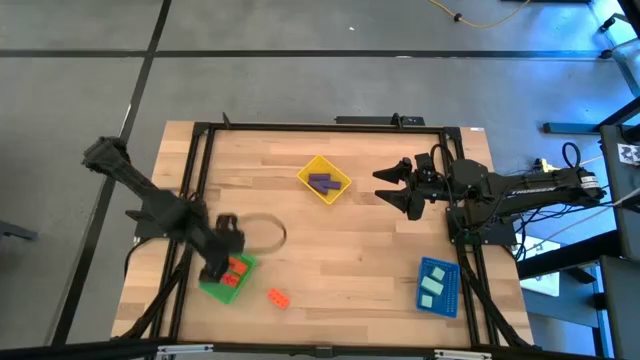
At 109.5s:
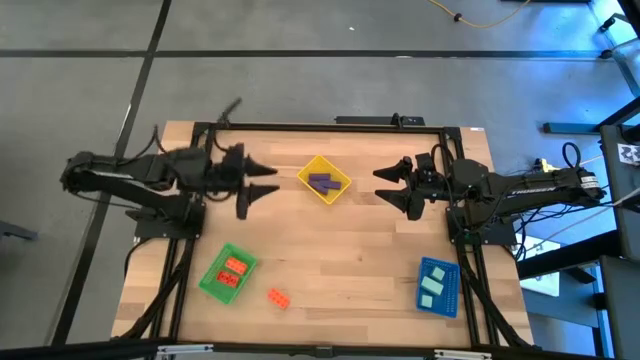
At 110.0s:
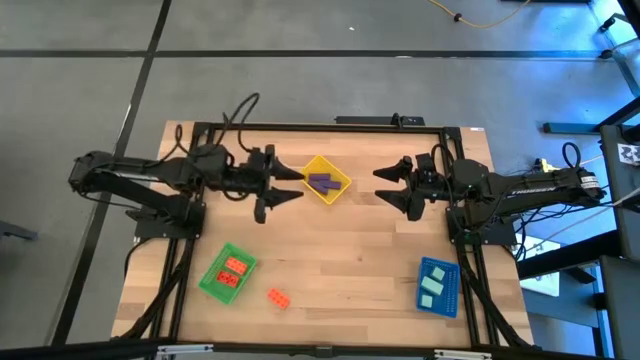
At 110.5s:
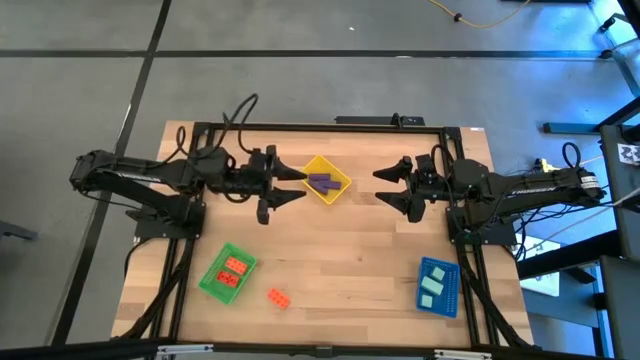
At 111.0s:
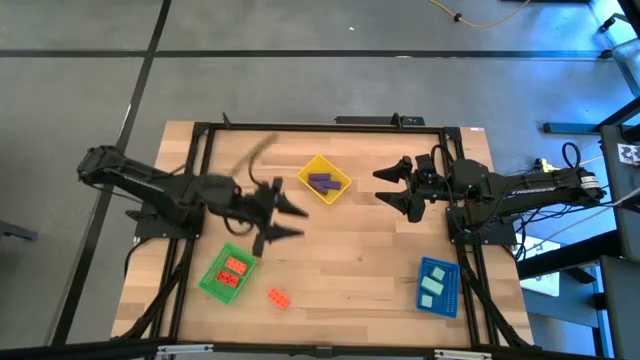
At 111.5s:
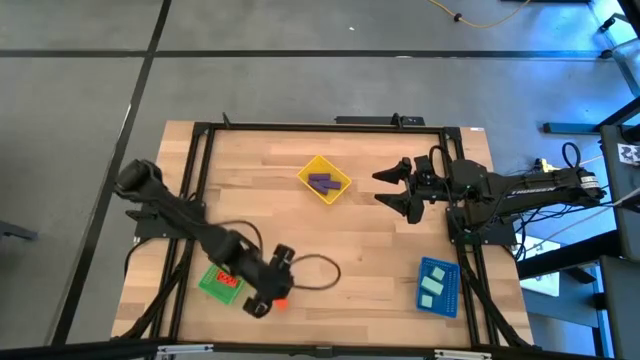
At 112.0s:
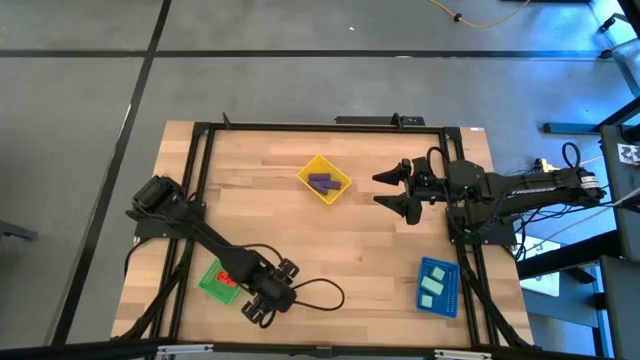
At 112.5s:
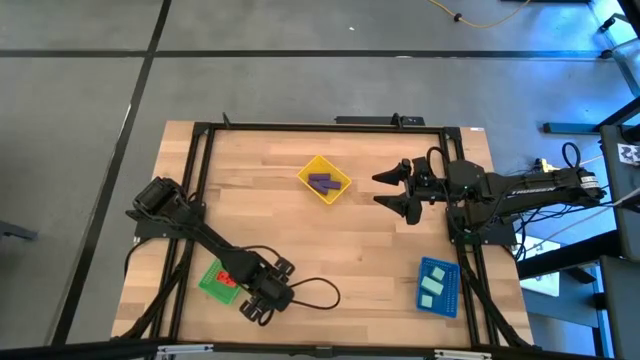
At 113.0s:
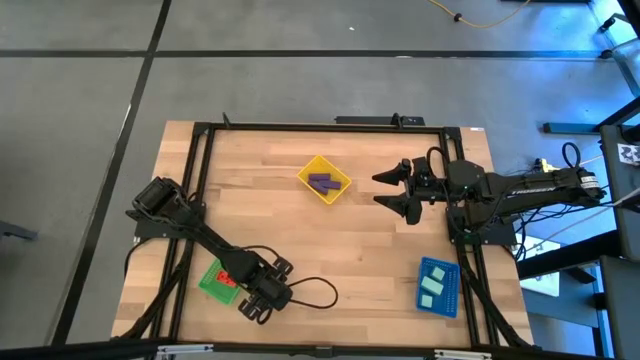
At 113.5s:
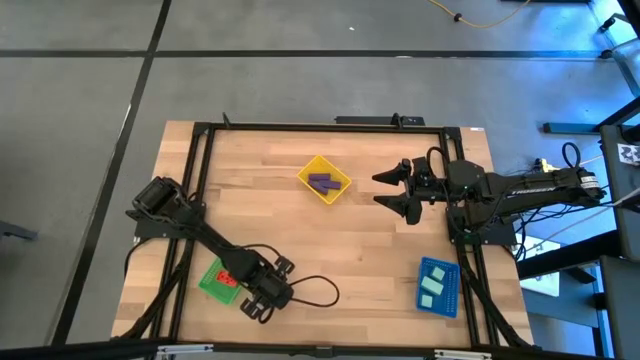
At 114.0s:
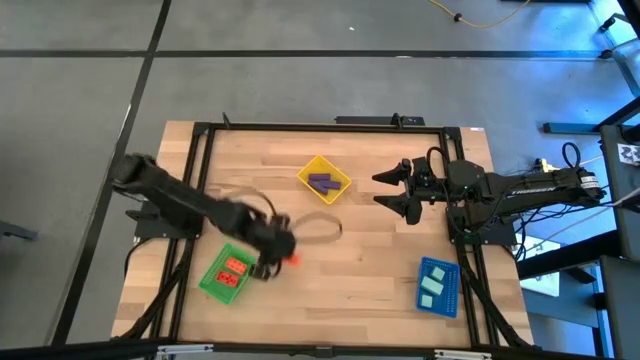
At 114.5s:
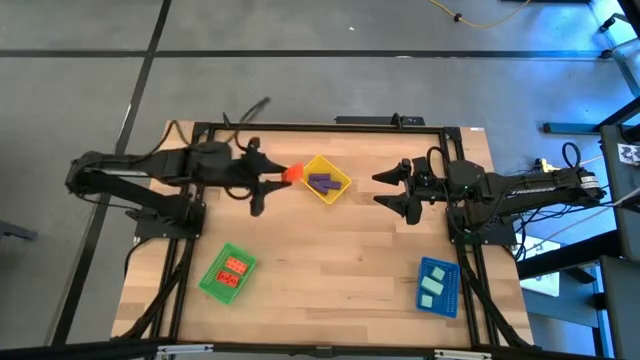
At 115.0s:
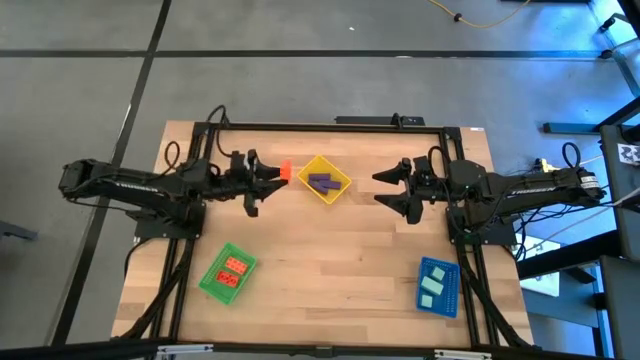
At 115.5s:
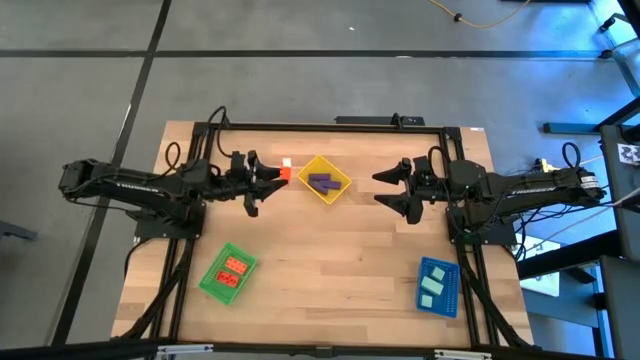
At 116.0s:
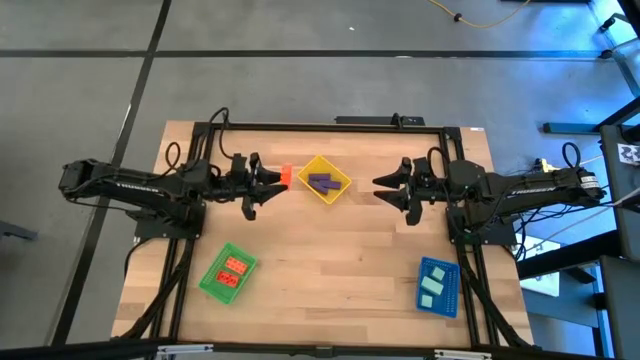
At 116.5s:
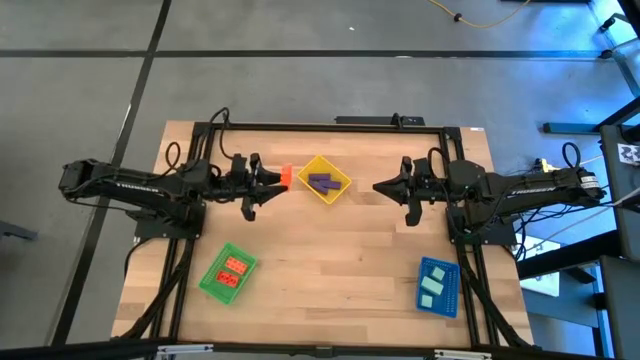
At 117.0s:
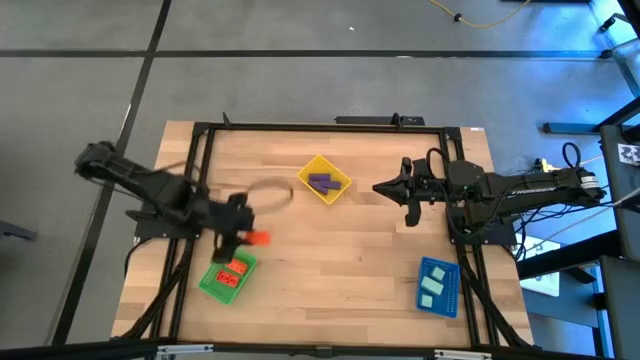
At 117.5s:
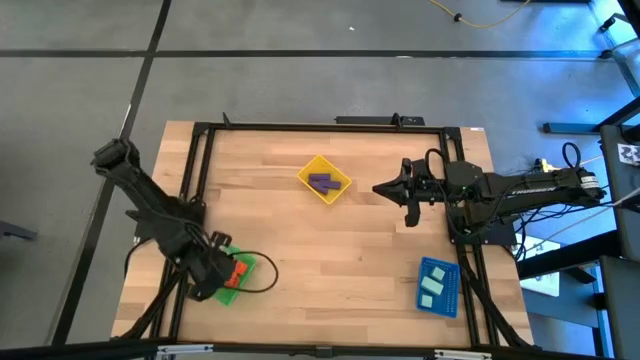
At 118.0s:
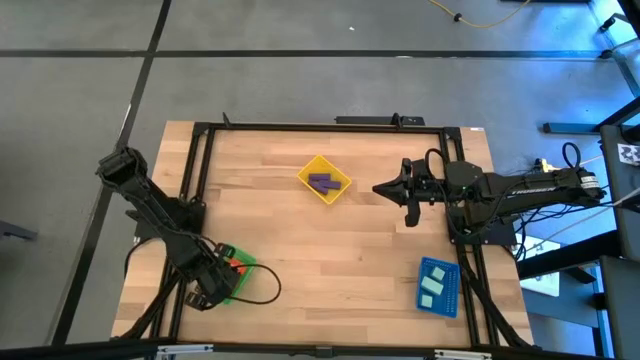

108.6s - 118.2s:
Task: Sort & place blocks by color
Put the orange game piece into the green bin

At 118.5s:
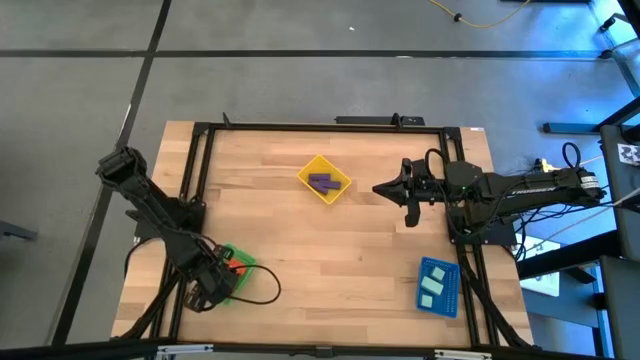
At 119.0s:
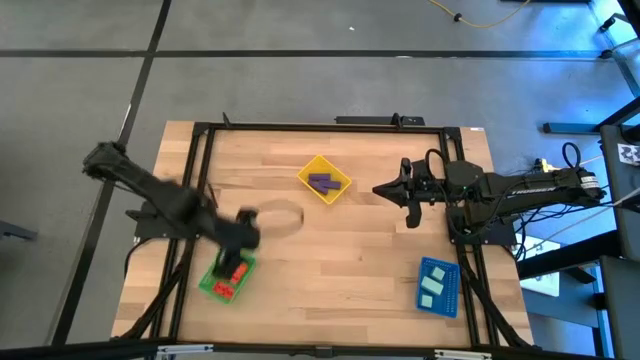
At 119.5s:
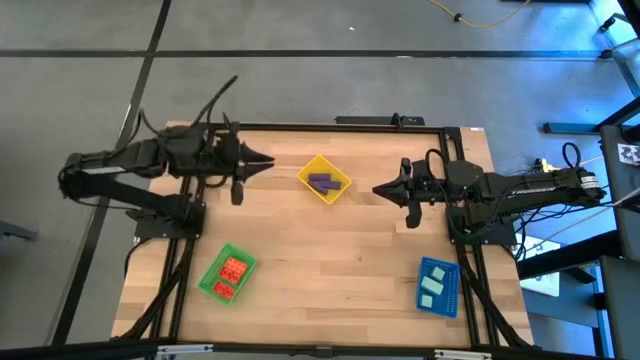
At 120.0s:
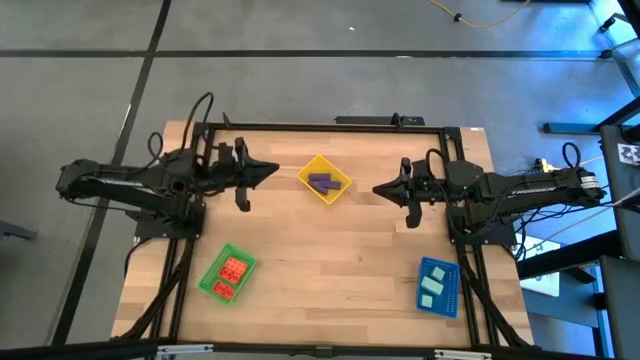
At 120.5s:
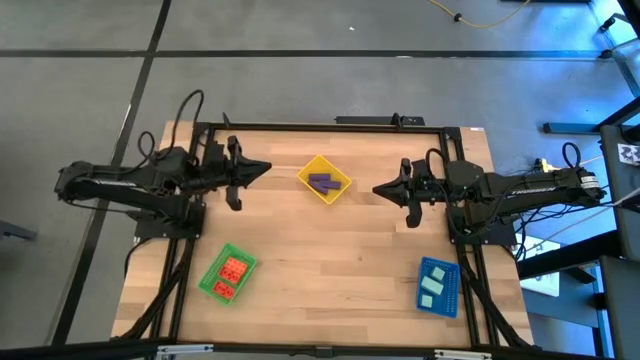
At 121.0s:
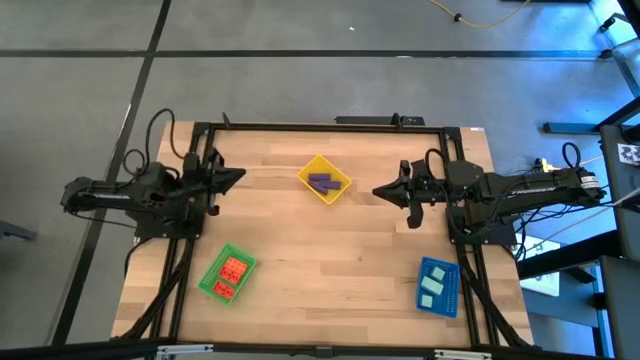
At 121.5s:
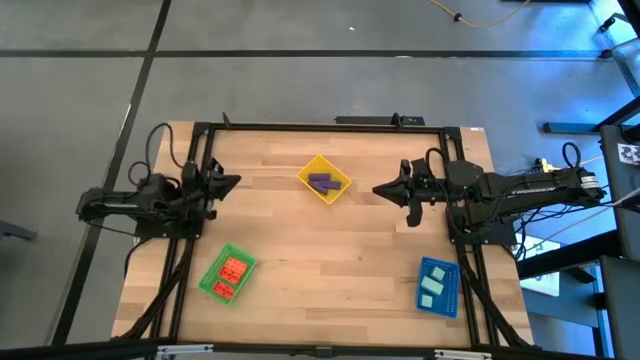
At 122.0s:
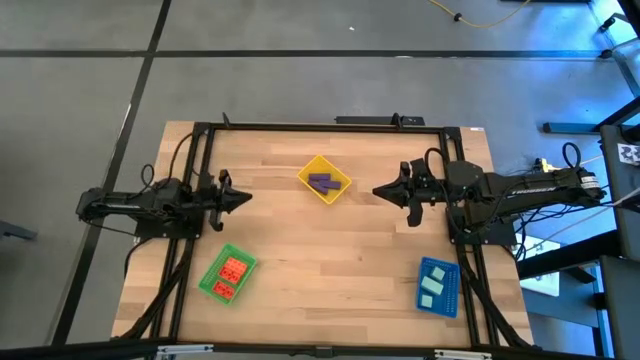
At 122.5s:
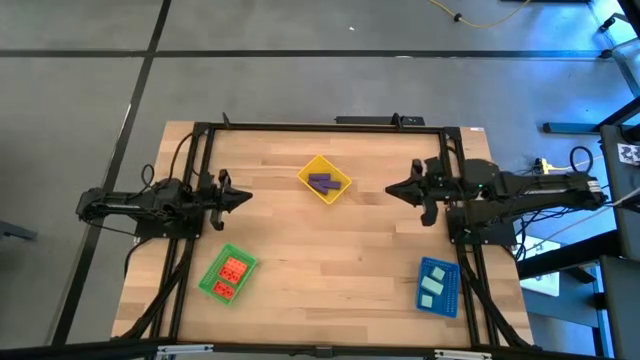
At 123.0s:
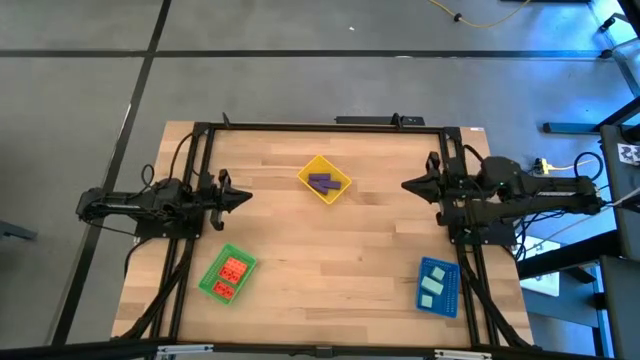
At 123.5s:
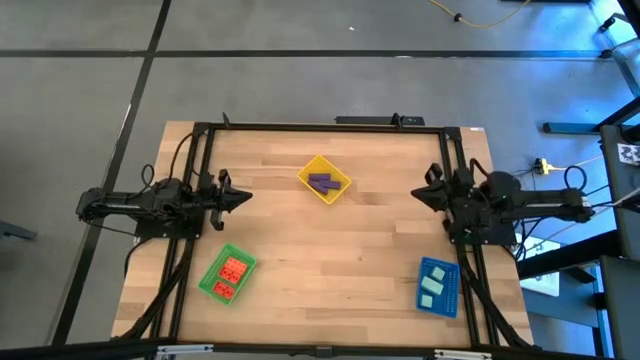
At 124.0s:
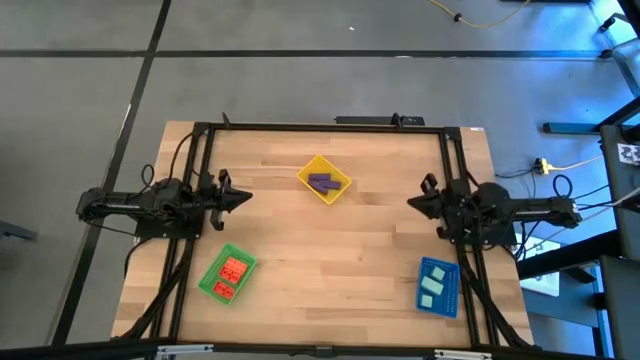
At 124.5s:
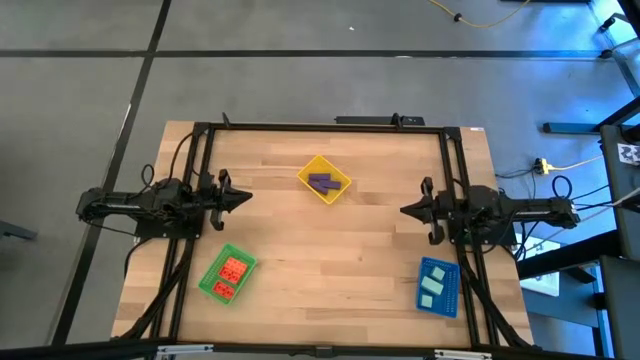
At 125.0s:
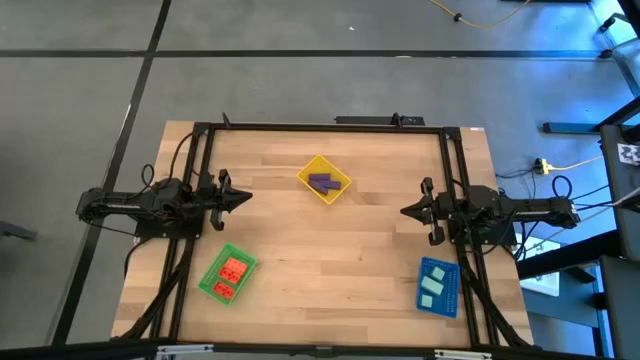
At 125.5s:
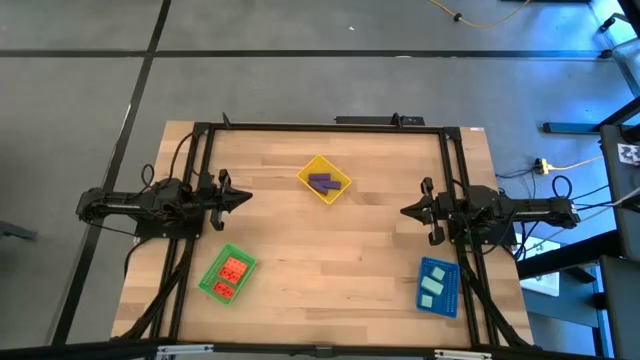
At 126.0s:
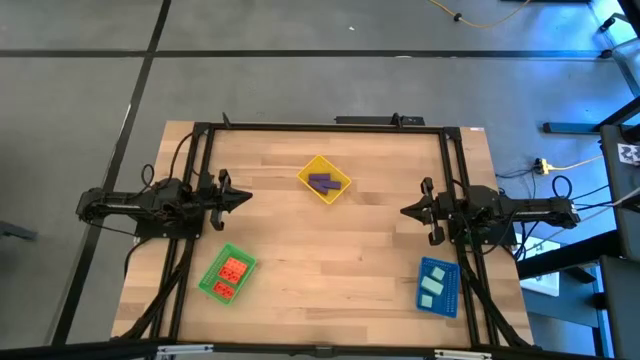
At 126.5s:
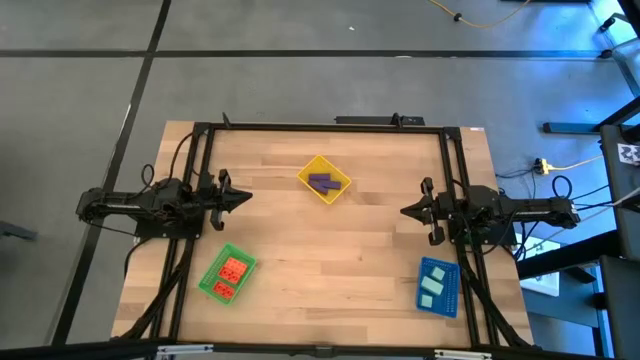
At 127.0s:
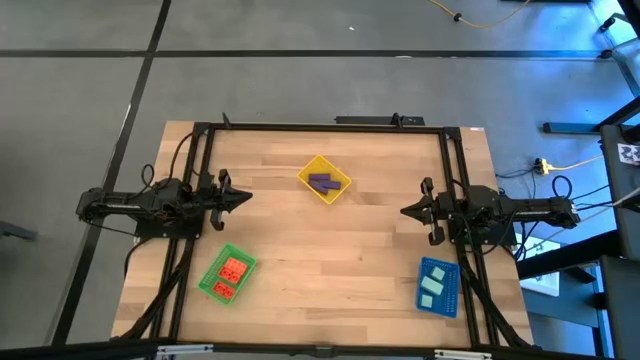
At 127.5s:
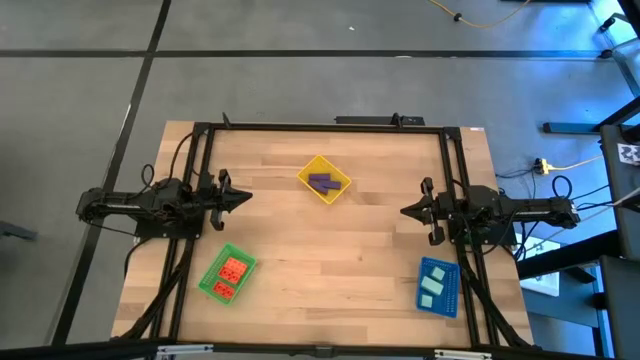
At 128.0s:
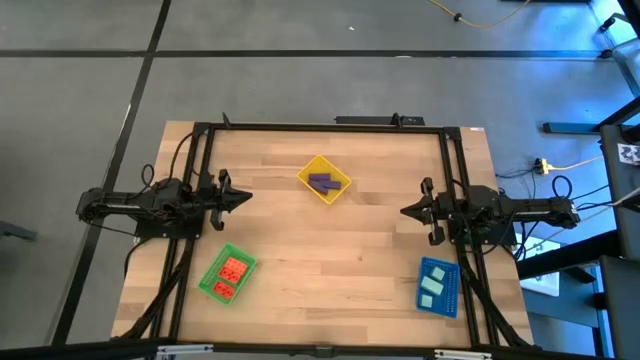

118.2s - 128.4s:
Return to Home Position

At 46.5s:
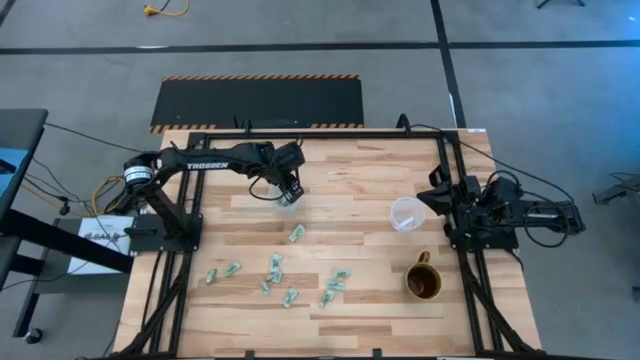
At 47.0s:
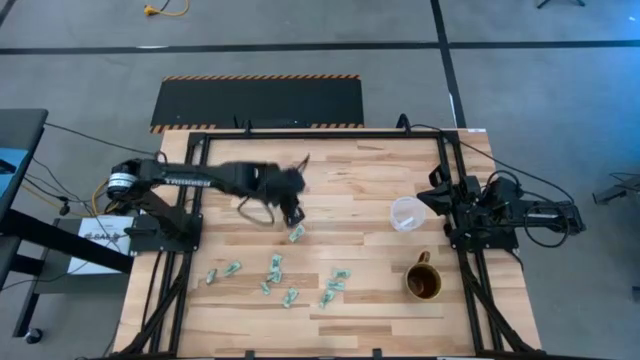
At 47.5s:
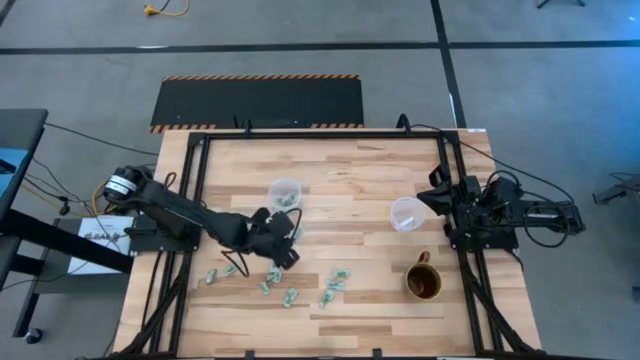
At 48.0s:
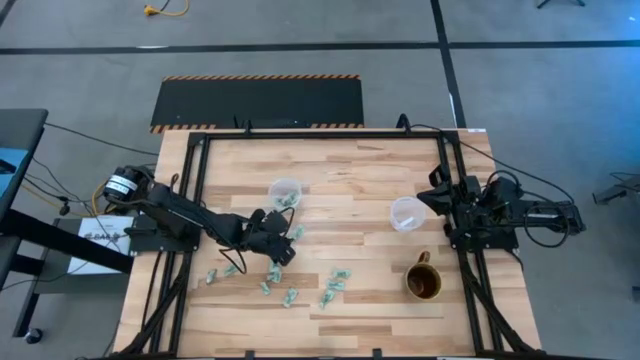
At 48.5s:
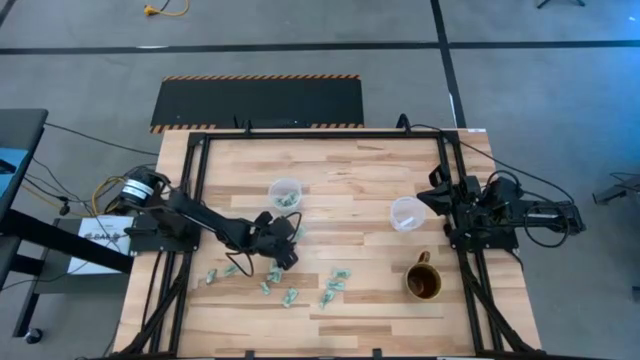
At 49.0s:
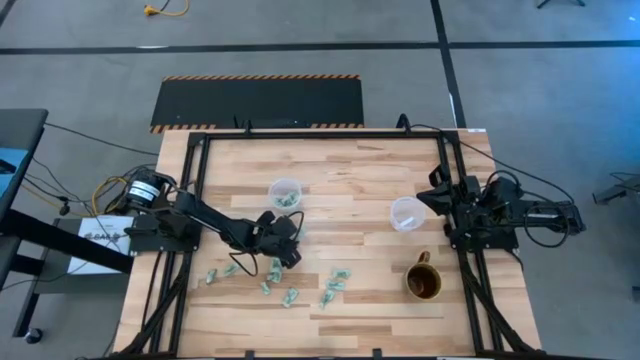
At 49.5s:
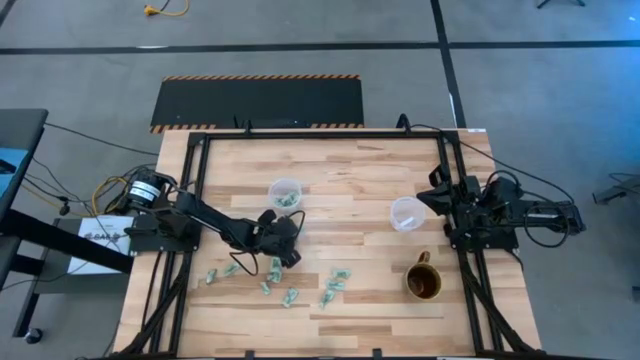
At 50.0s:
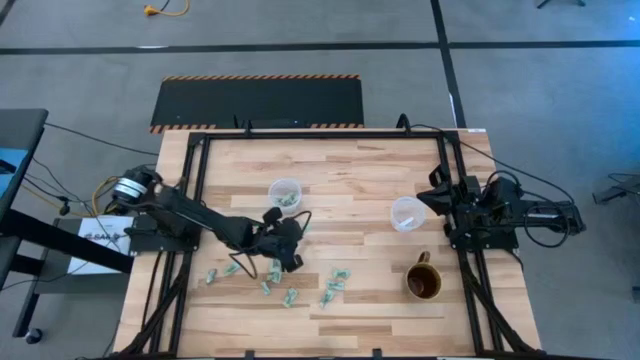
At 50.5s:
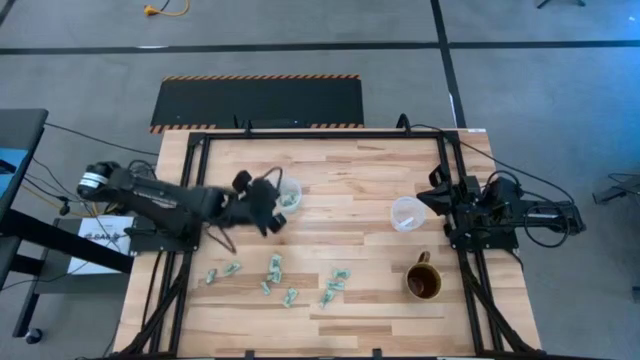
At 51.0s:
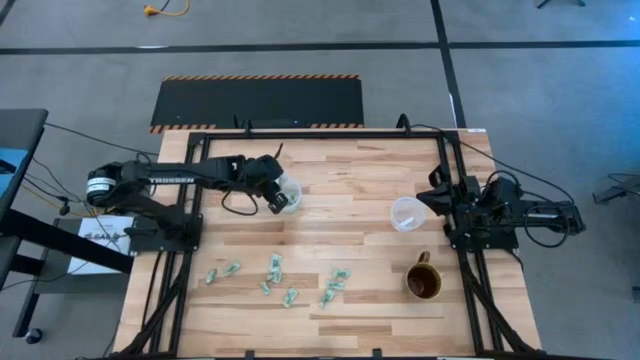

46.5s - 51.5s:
Task: Pick and place Stevia / Truvia into bins
Put the white stevia packet into the left transparent container
